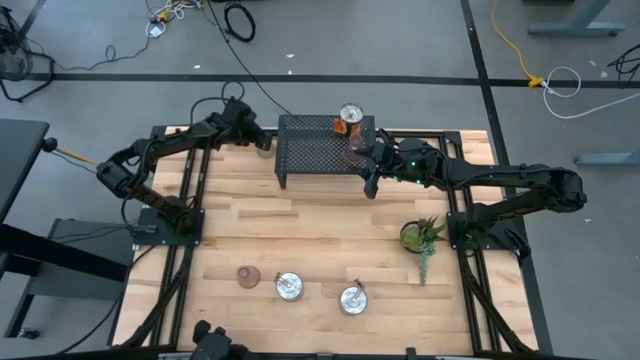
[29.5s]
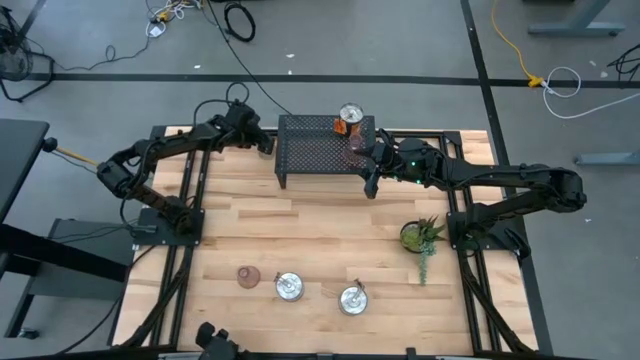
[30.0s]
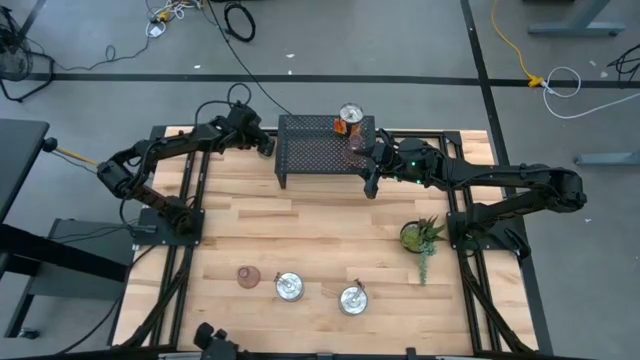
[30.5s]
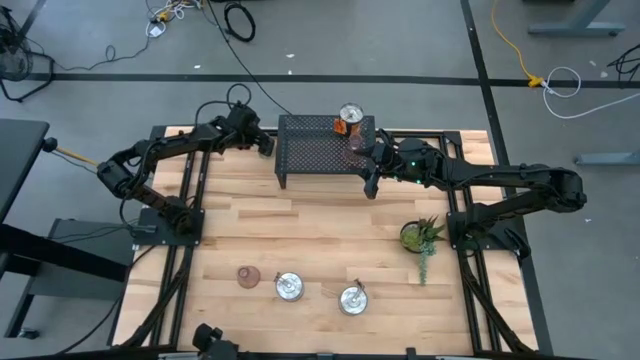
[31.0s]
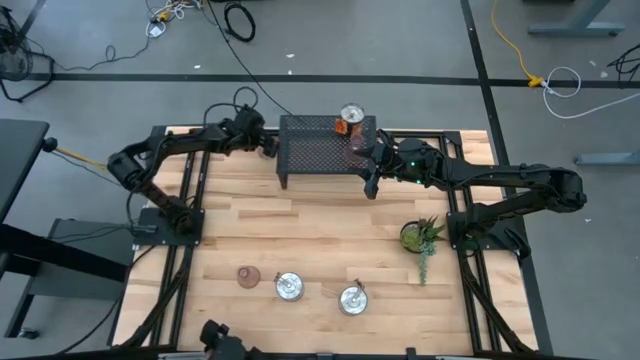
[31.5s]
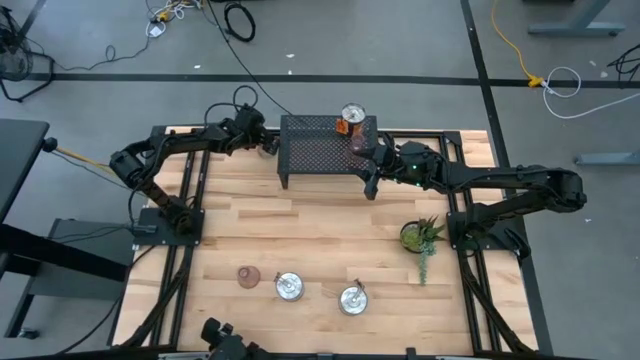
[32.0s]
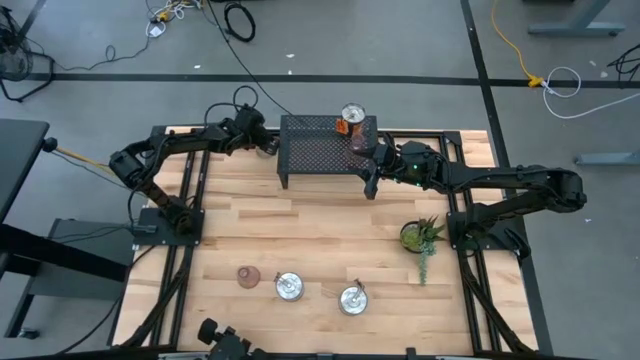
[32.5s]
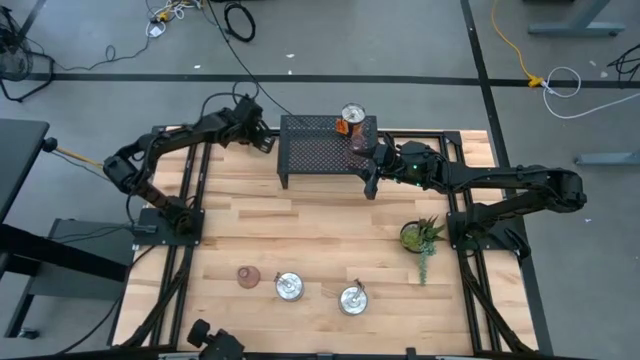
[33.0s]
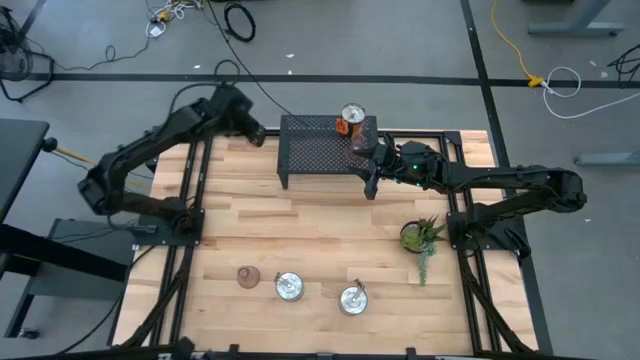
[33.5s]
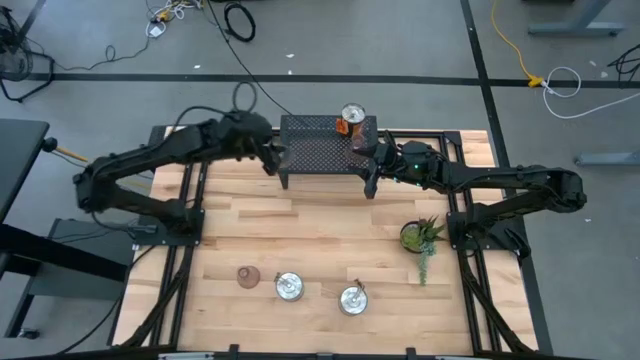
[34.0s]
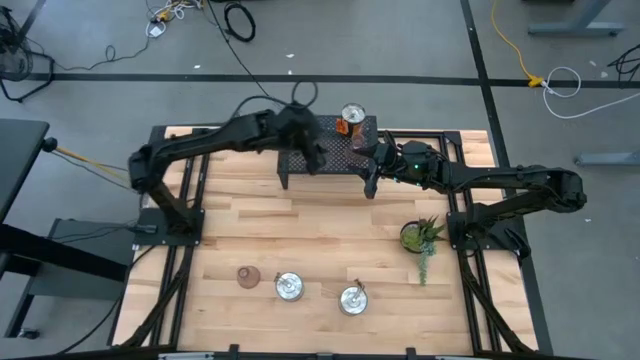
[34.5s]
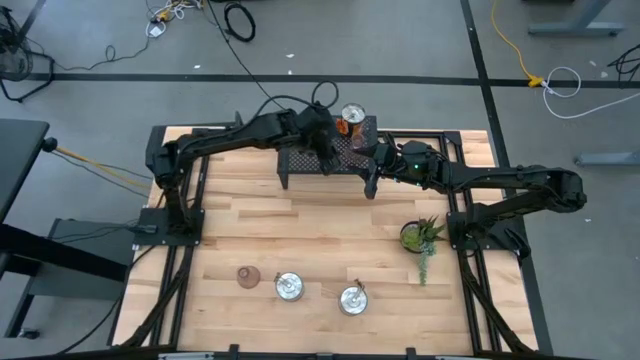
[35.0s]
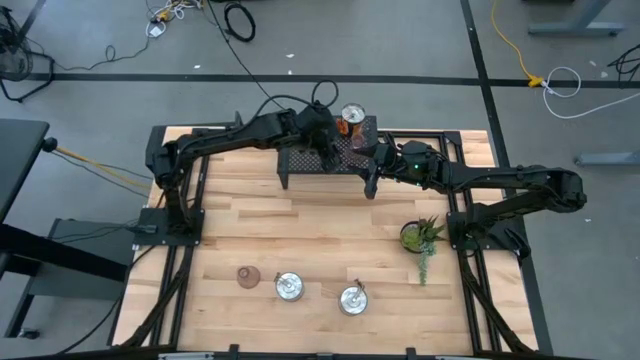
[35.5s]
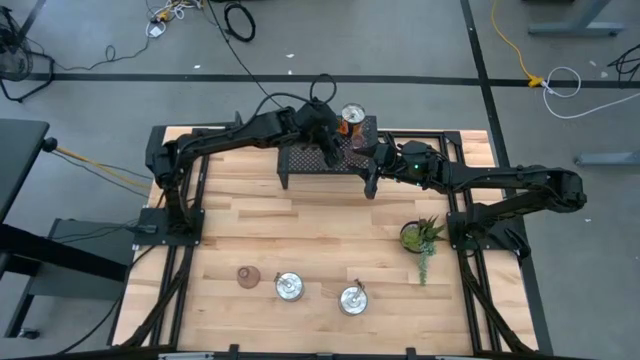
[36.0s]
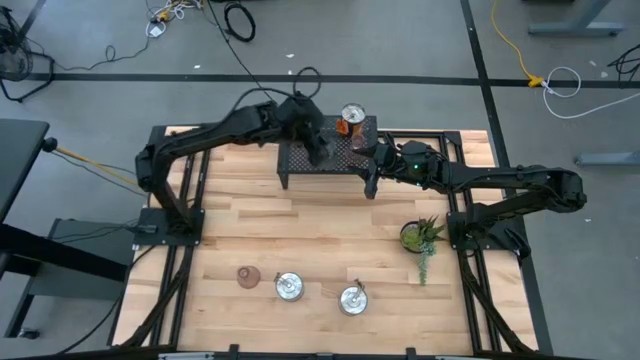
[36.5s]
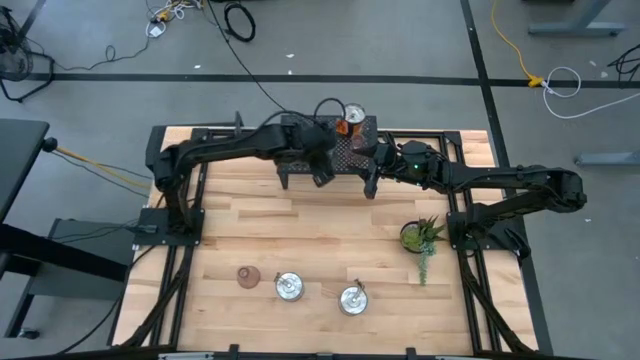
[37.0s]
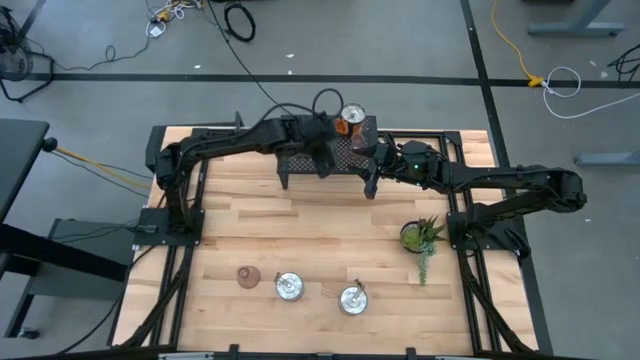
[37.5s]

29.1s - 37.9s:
Task: Pick & Place candle stick holders
Put the green candle holder on the shelf

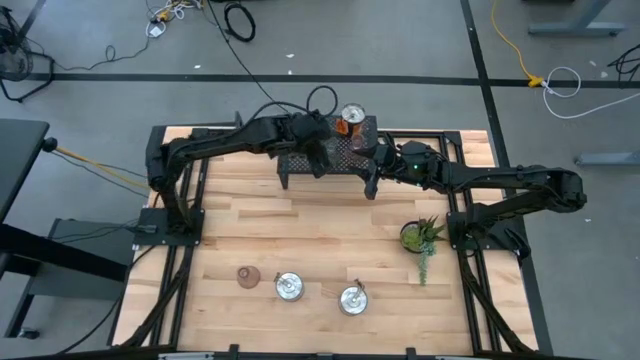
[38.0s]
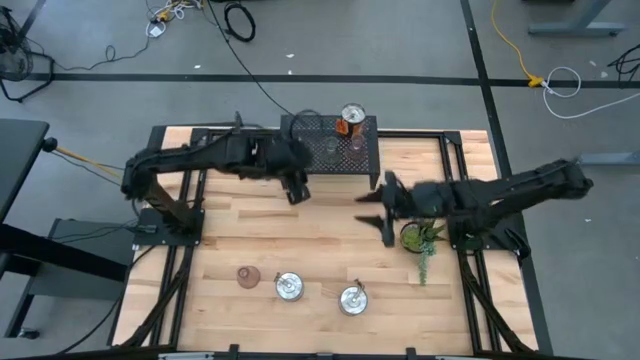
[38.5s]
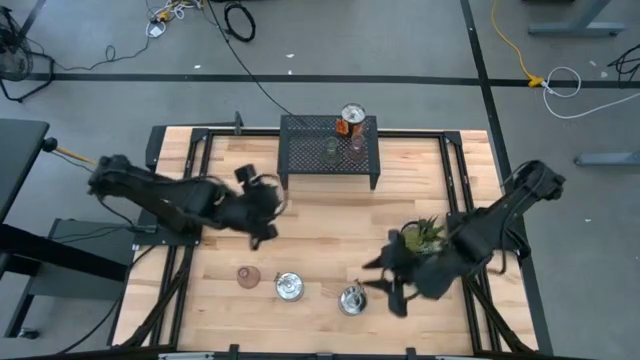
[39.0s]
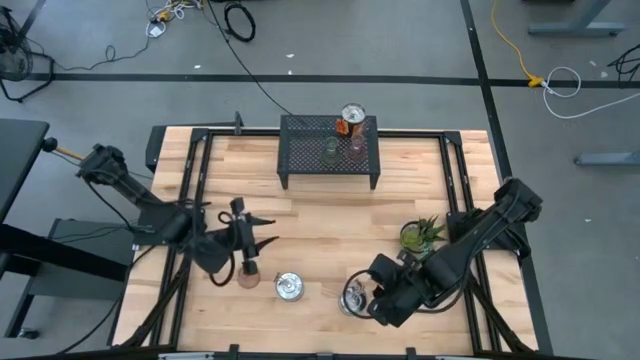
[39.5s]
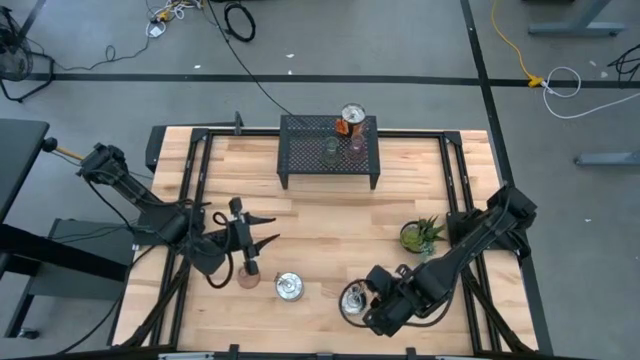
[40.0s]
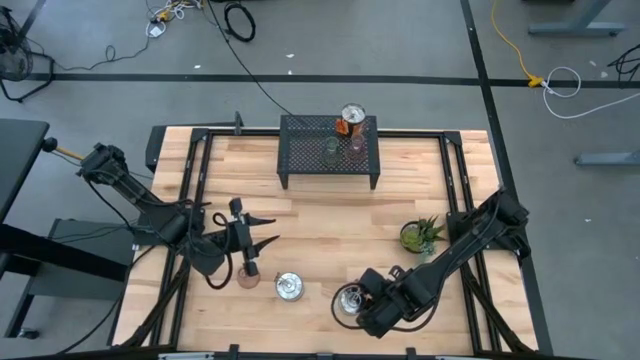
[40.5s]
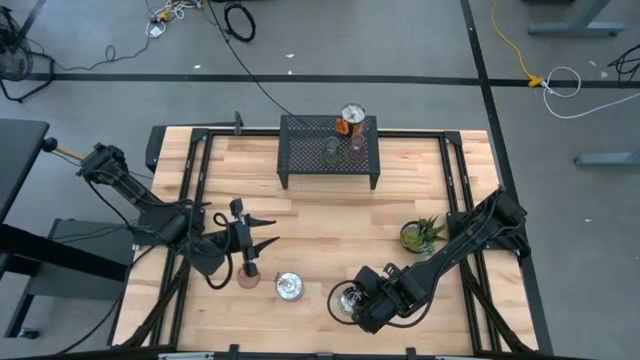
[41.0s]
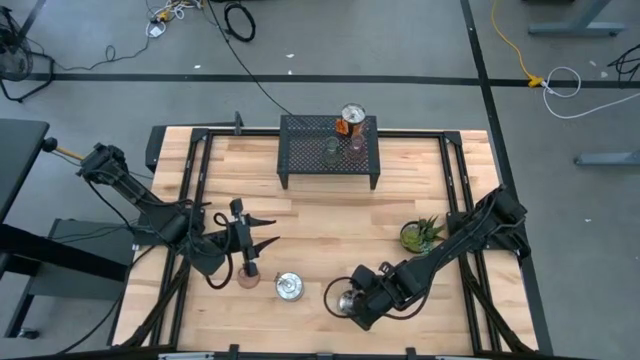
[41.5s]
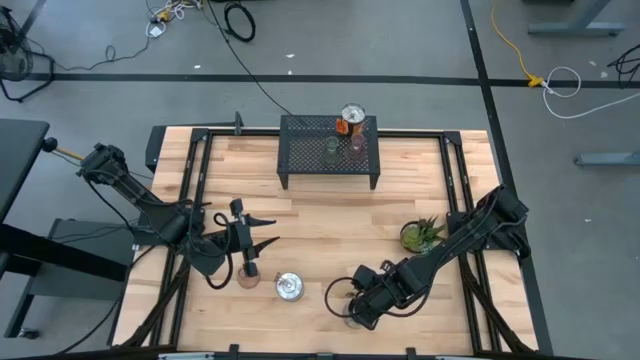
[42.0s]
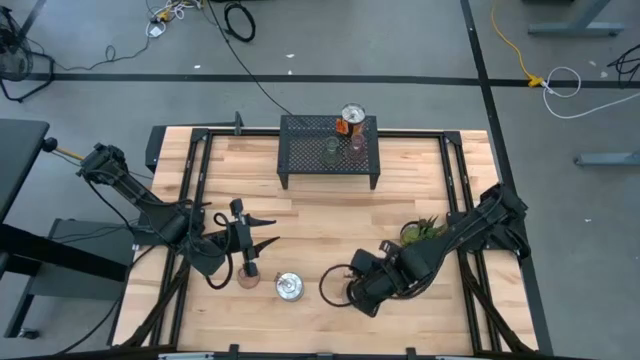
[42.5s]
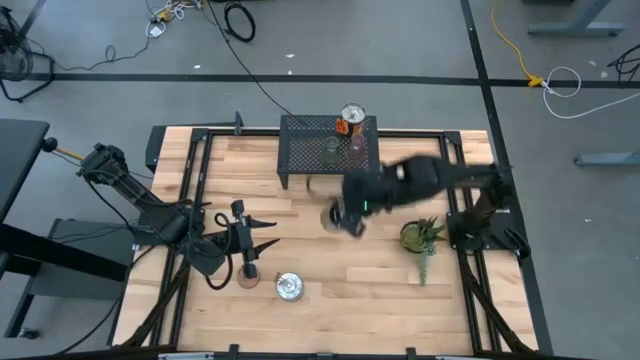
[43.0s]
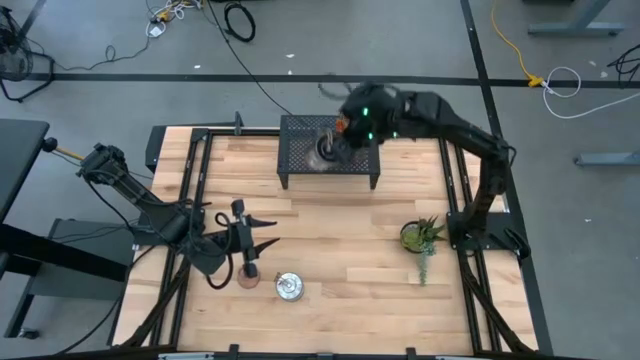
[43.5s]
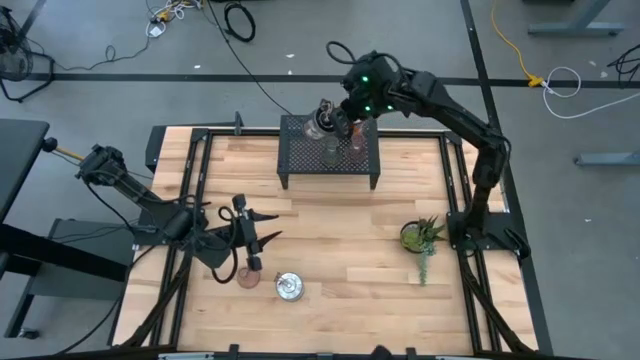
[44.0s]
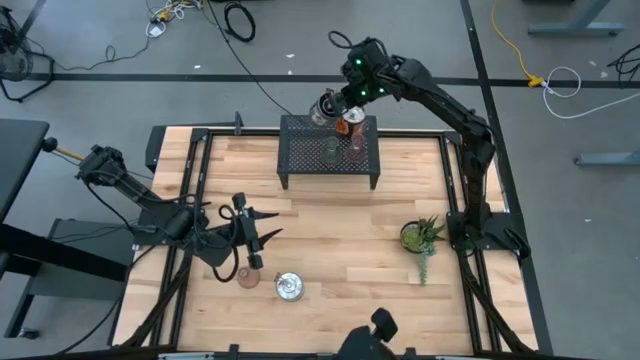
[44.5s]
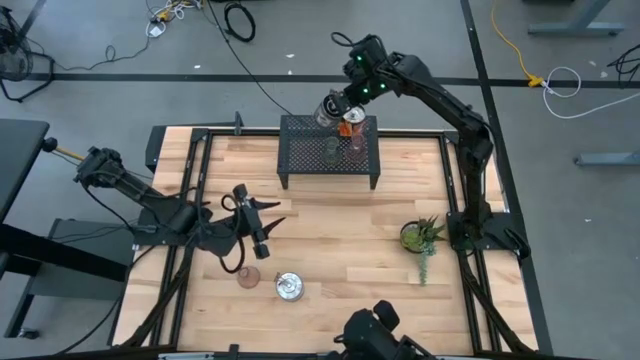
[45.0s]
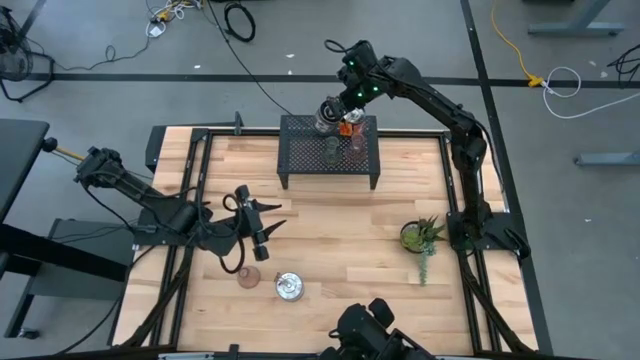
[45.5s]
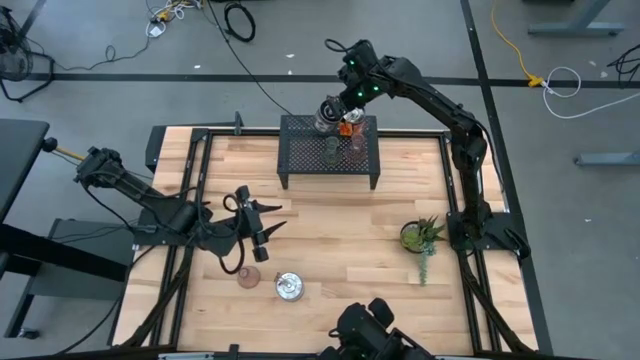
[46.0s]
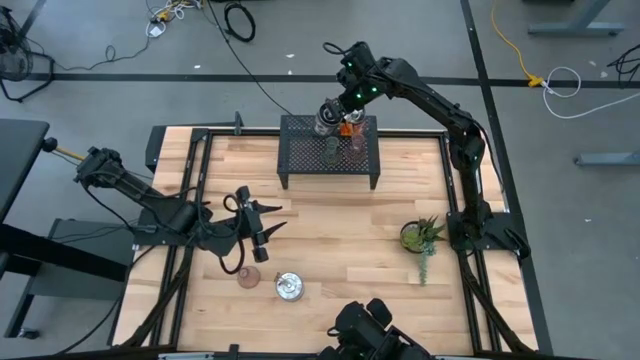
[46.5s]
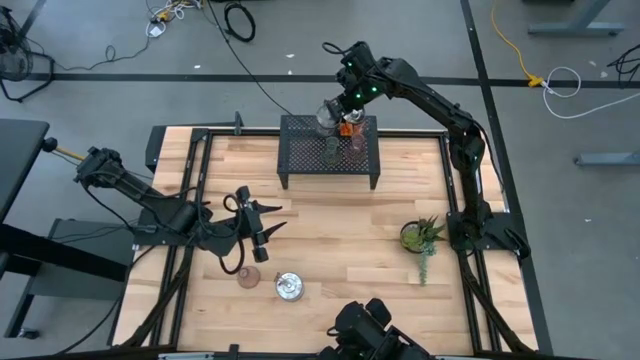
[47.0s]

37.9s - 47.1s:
Put the right brown scented candle on the shelf

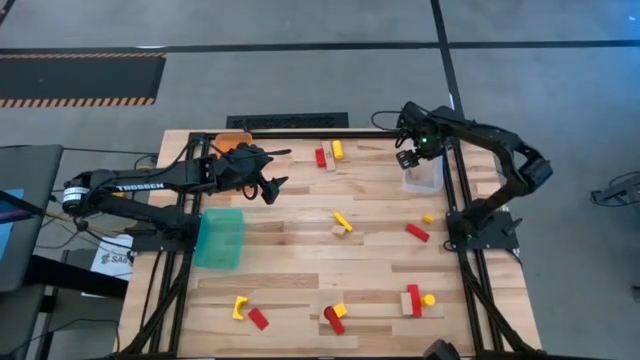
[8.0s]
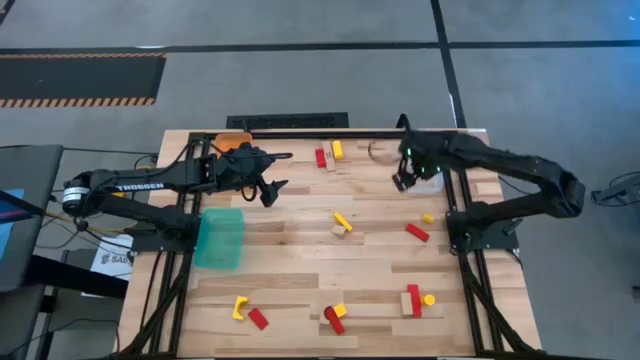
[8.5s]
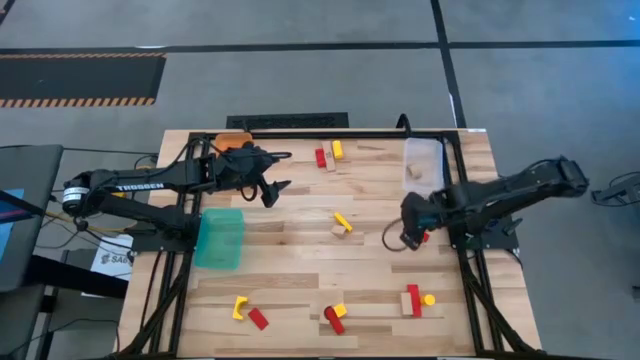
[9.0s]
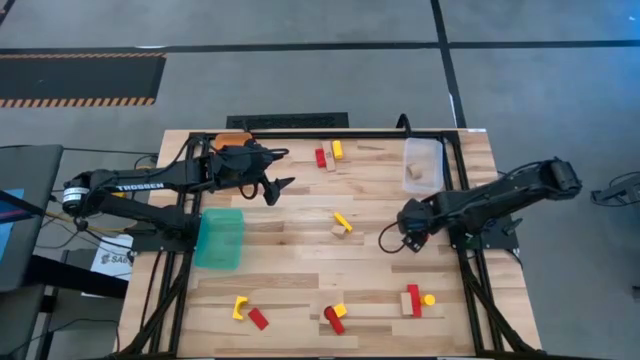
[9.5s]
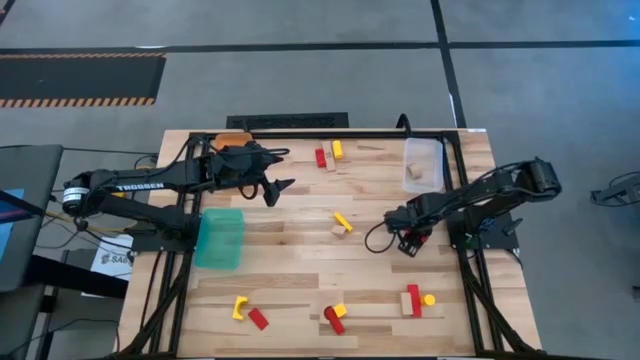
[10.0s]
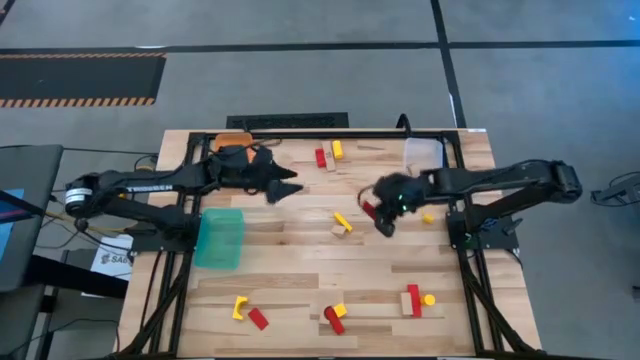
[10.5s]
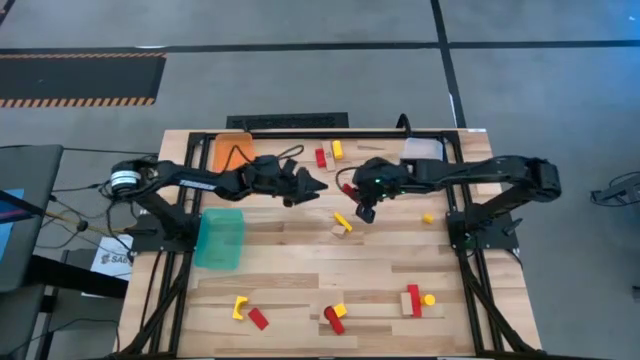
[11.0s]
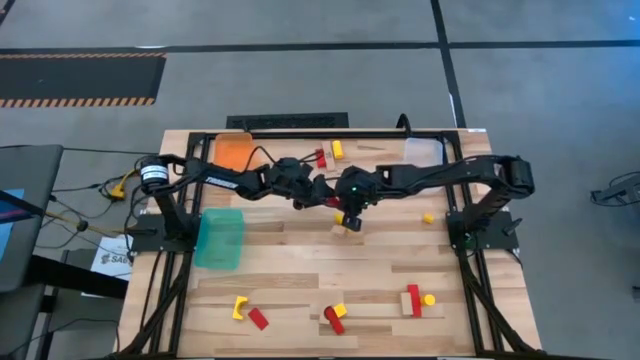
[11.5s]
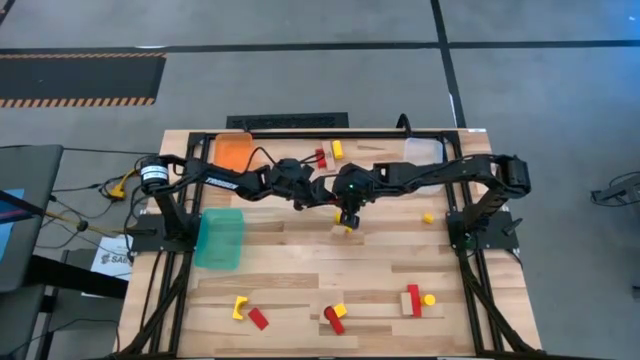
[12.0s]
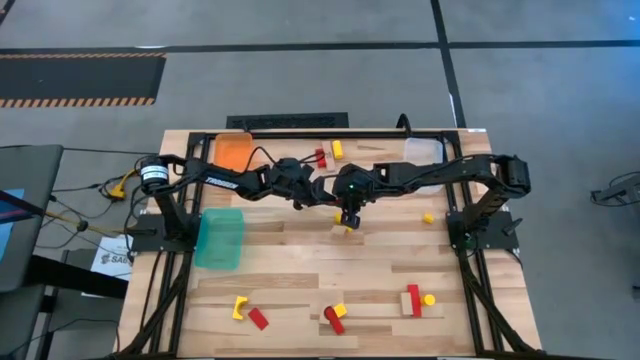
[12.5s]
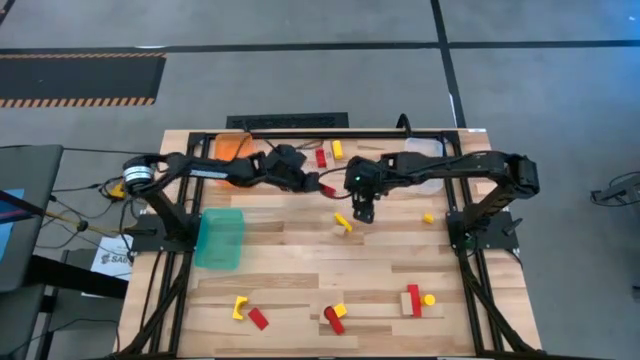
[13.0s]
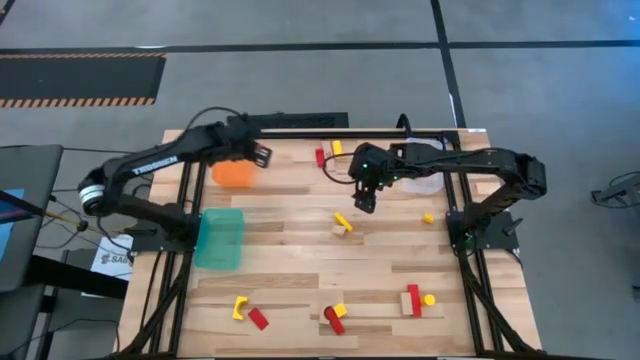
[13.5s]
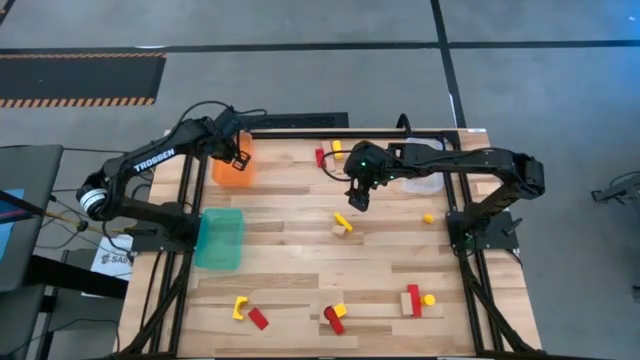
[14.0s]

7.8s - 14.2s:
Task: Sort & place blocks by color
Put the red wooden block into the orange bin
